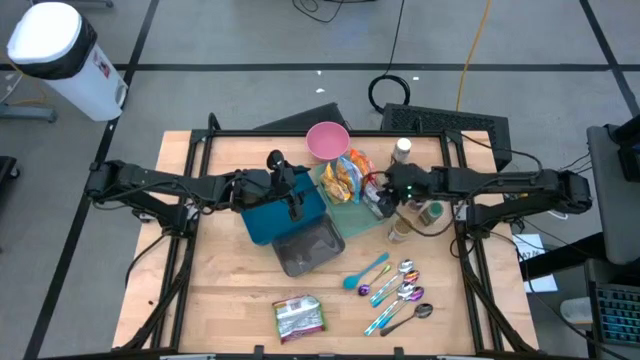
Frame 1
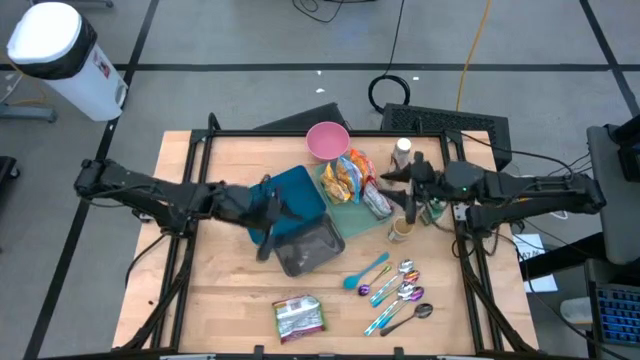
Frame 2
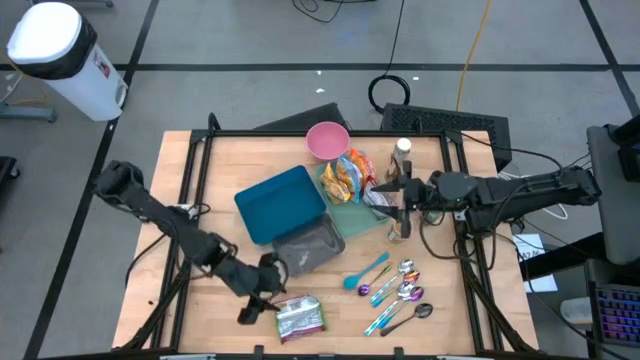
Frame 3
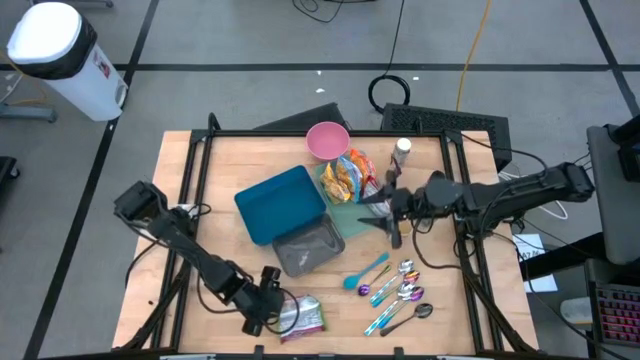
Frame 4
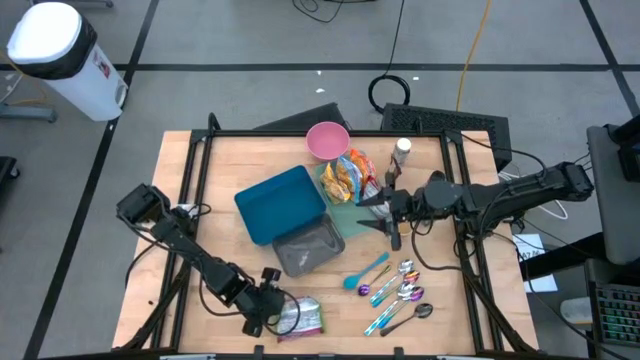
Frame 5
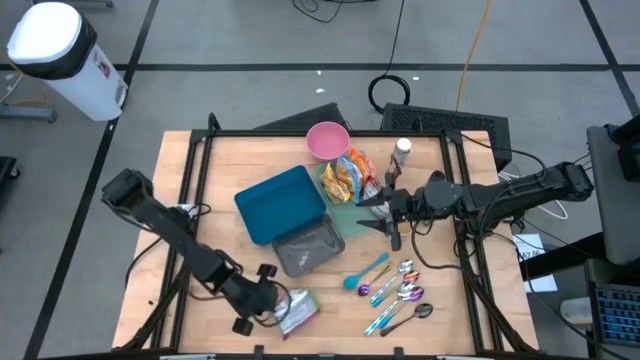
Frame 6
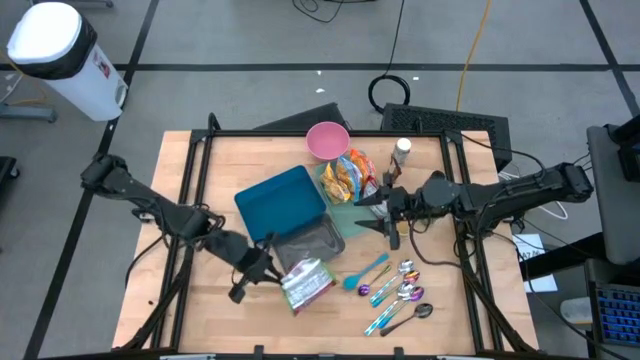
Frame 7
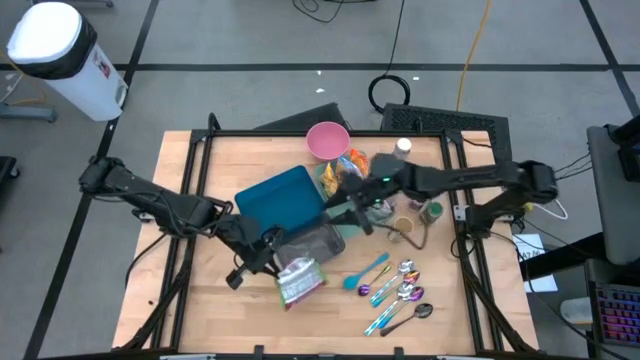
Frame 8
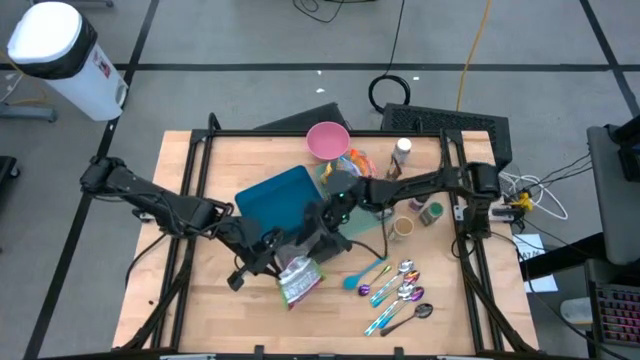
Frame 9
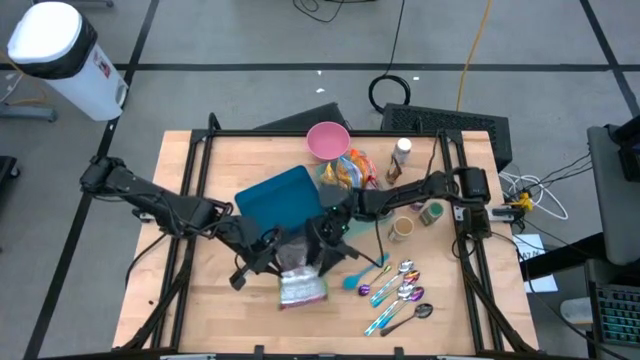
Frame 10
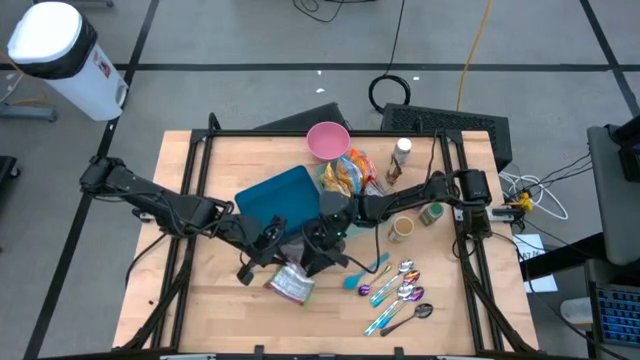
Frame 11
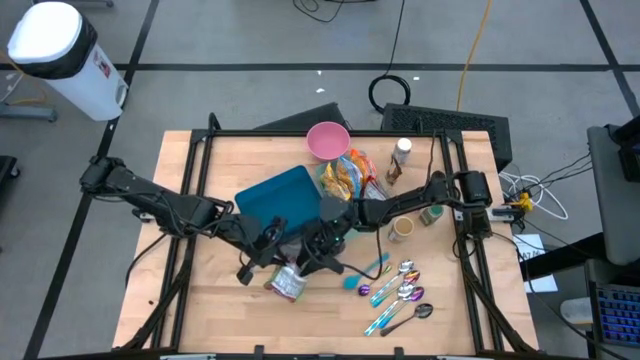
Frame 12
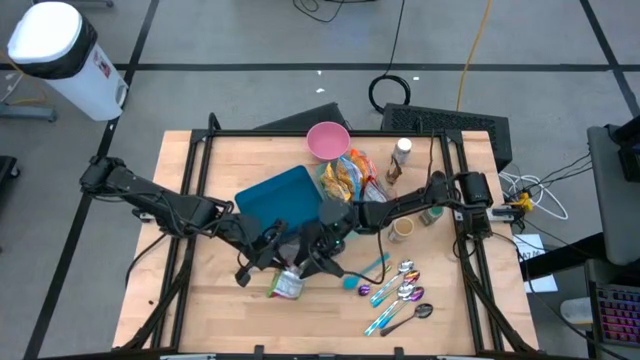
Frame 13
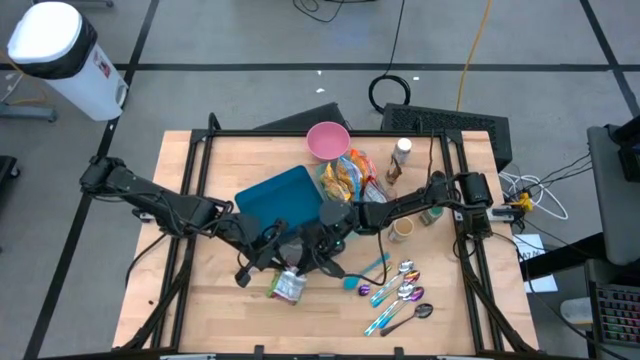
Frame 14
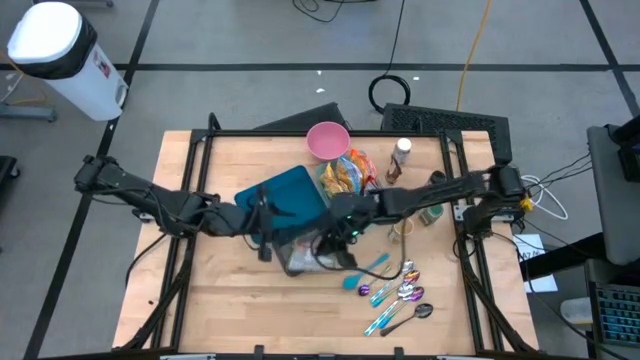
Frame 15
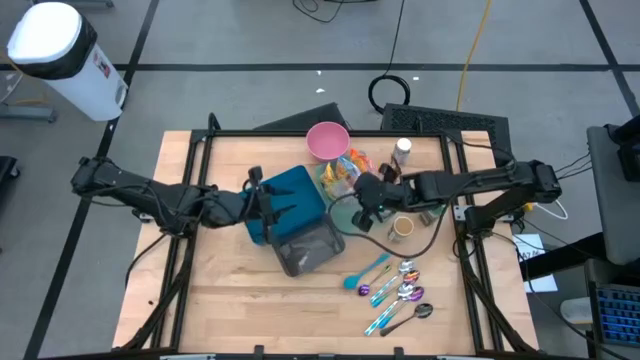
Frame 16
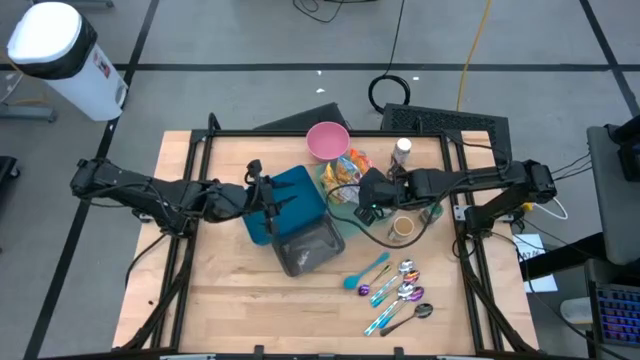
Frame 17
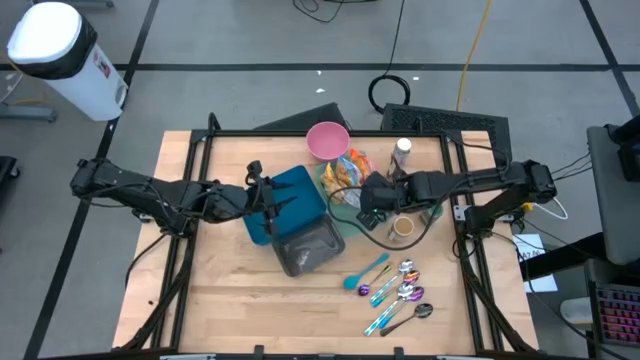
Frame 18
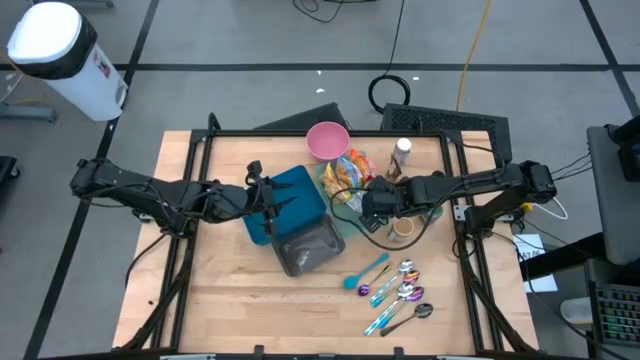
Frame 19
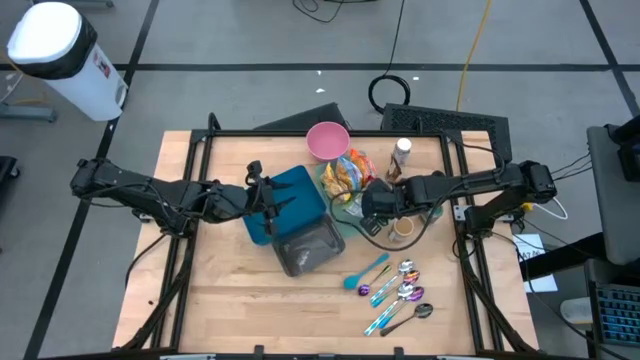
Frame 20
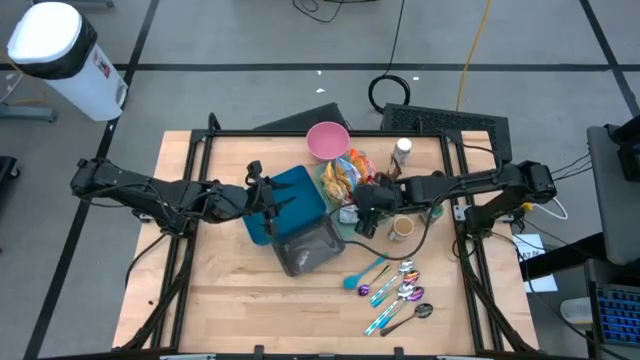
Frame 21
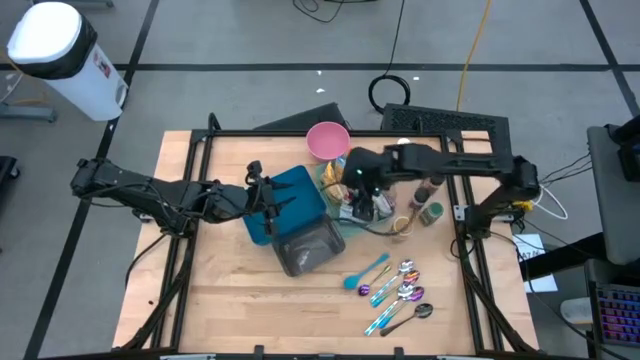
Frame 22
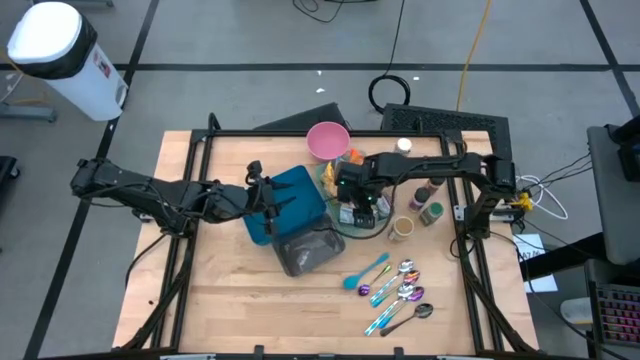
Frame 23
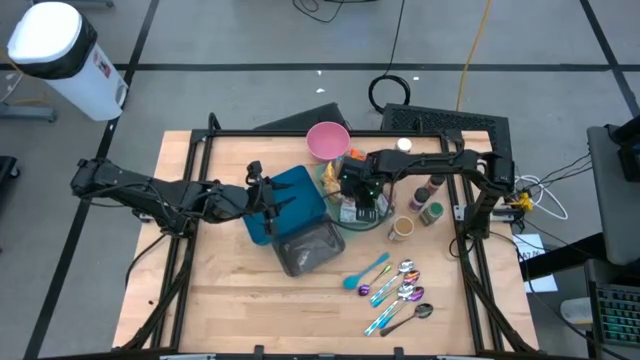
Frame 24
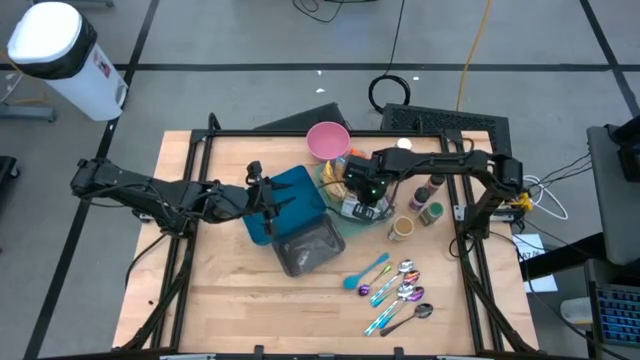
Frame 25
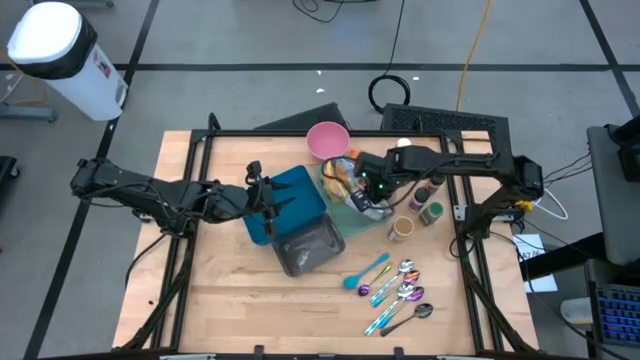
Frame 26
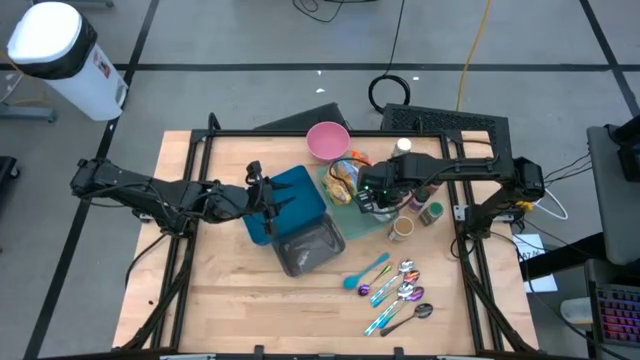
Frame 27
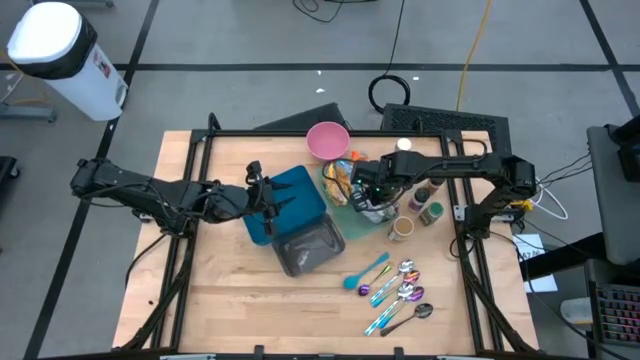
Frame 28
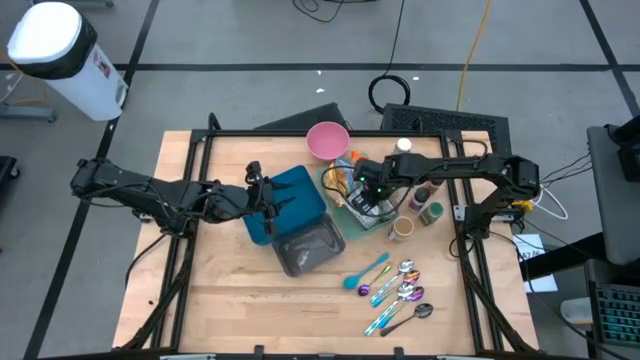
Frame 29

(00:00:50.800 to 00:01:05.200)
Task: Pick & Place Food Item
Put the green noodle pack into the green bin

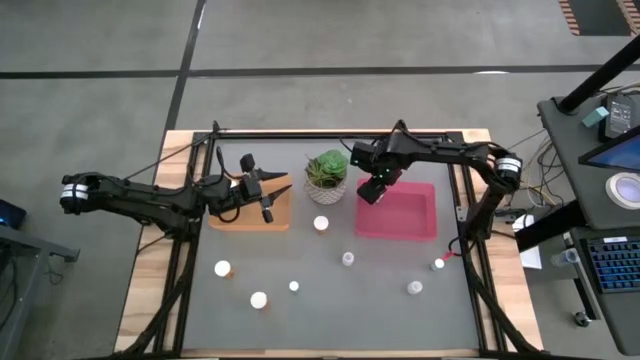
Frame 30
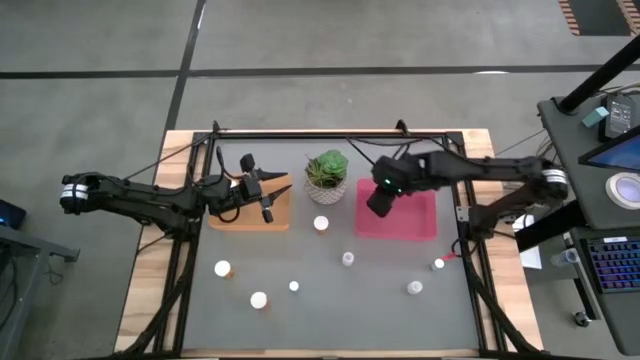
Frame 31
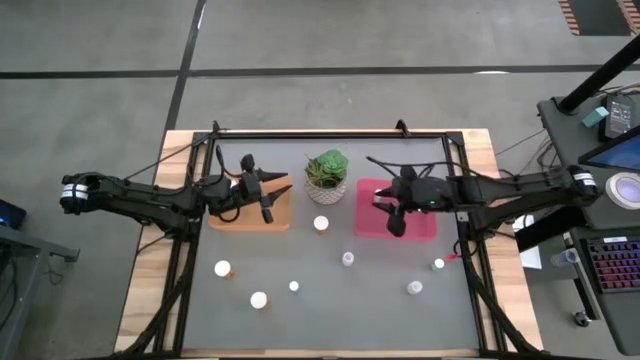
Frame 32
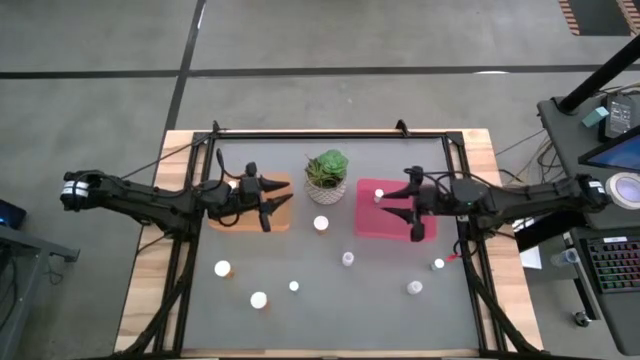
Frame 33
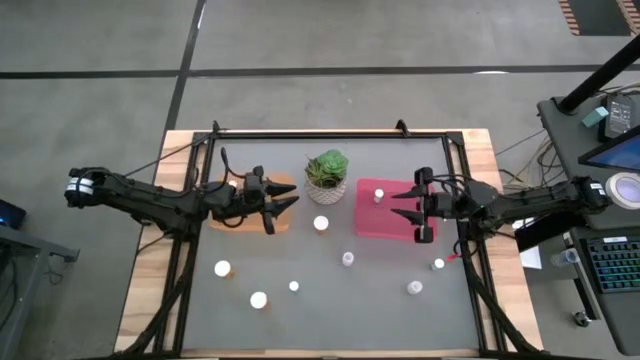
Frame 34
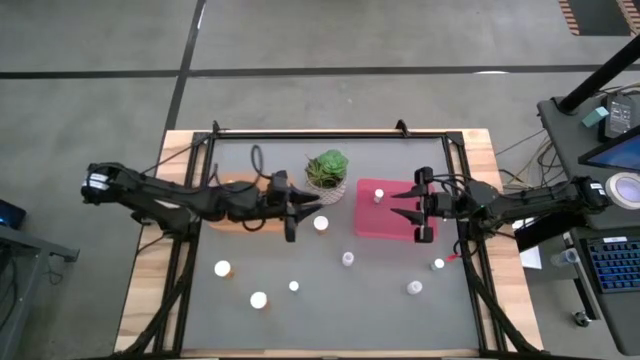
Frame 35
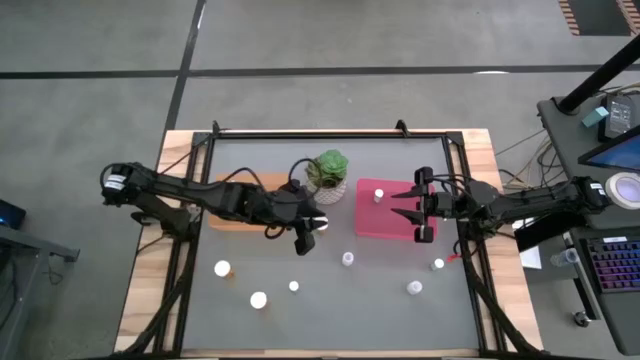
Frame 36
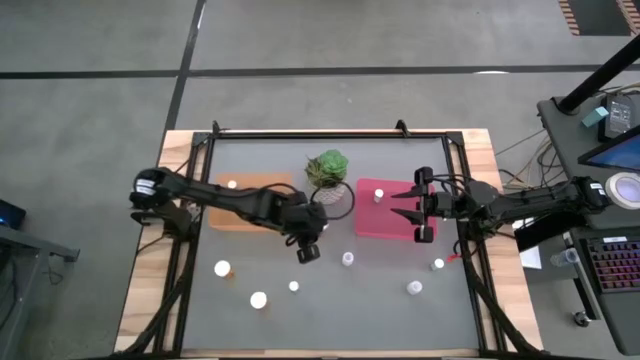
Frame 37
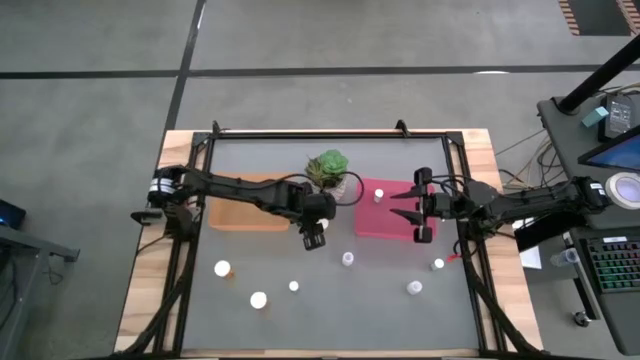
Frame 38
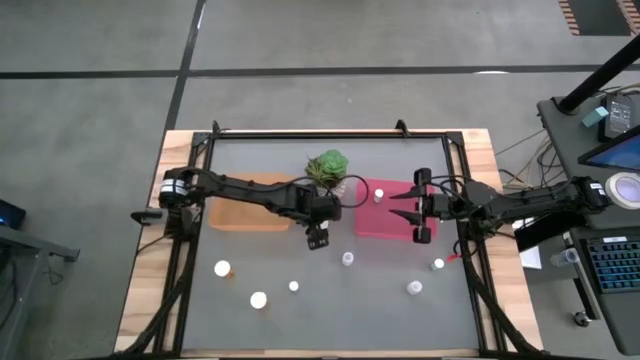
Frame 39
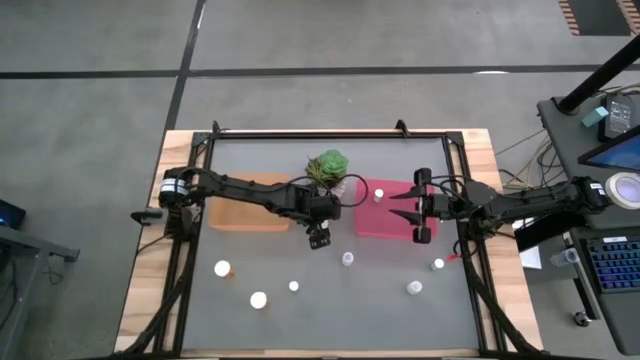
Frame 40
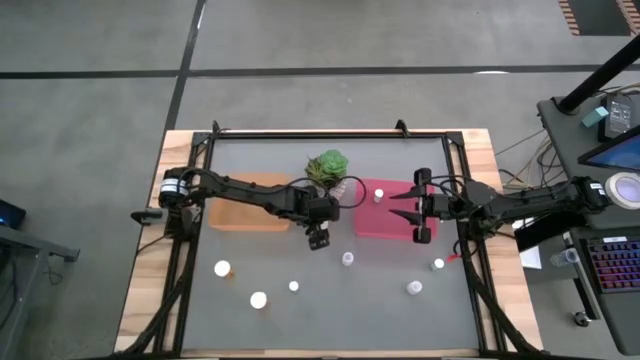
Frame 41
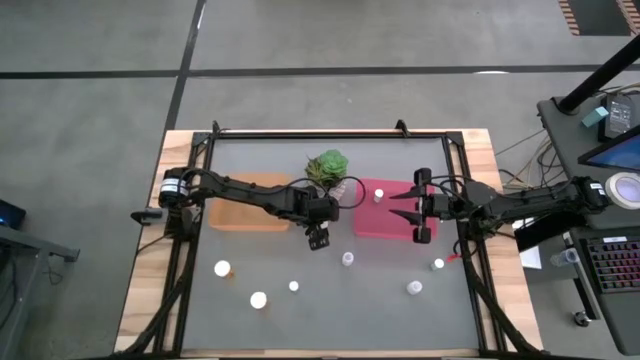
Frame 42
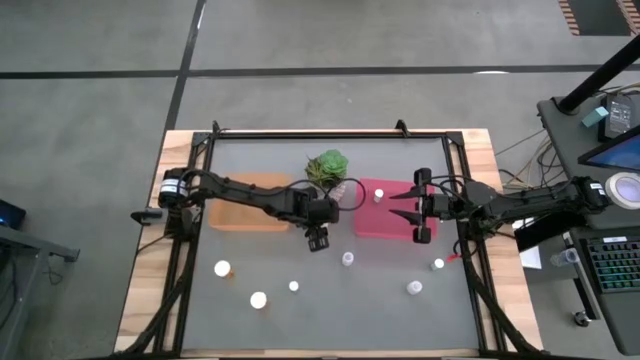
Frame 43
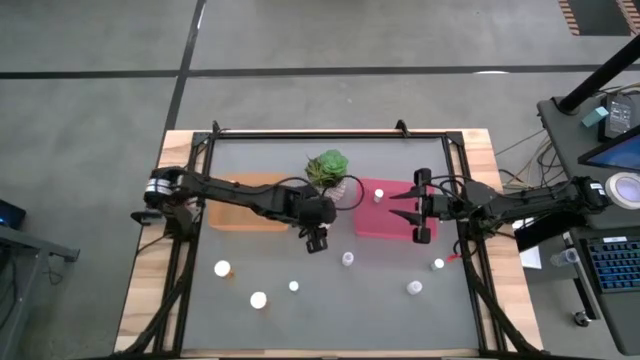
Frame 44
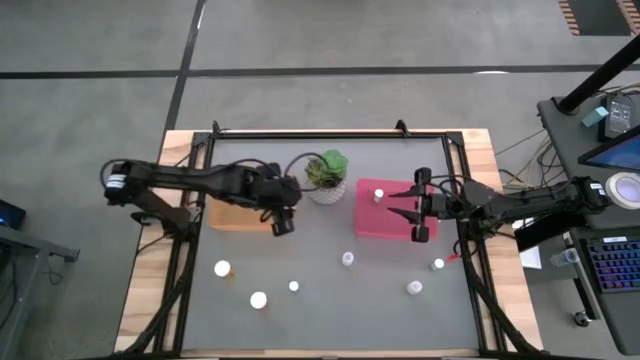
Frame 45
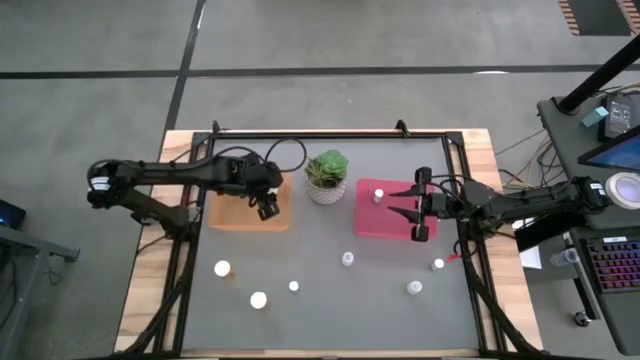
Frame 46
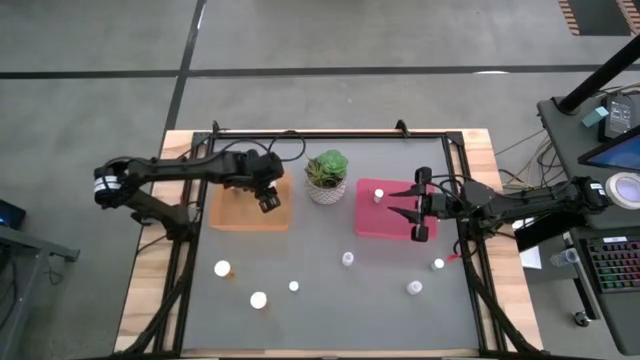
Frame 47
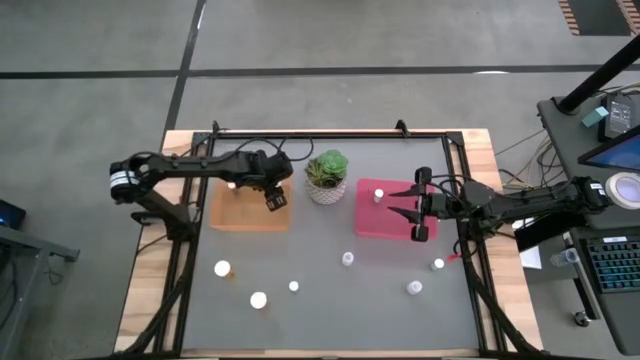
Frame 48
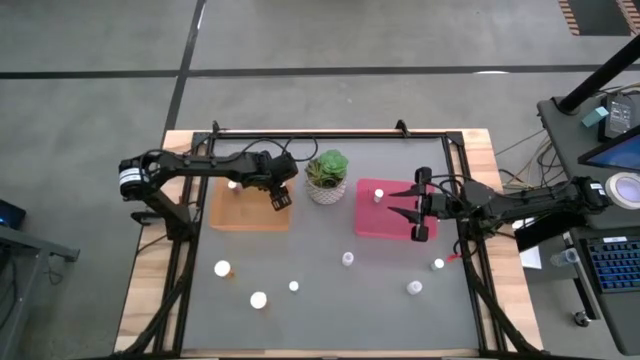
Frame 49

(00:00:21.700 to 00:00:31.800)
Task: Pick and place medicine bottles into bin by pill shape (circle, oval)
Put the top large orange pill bottle in the orange bin
